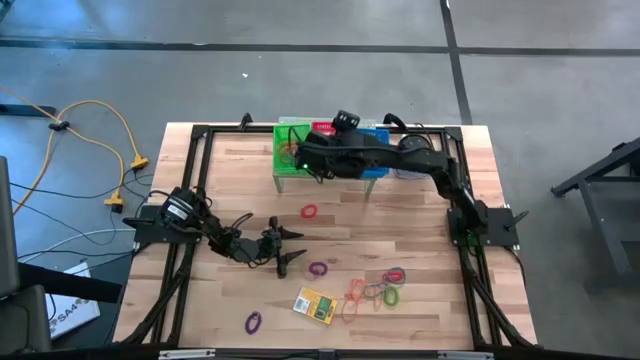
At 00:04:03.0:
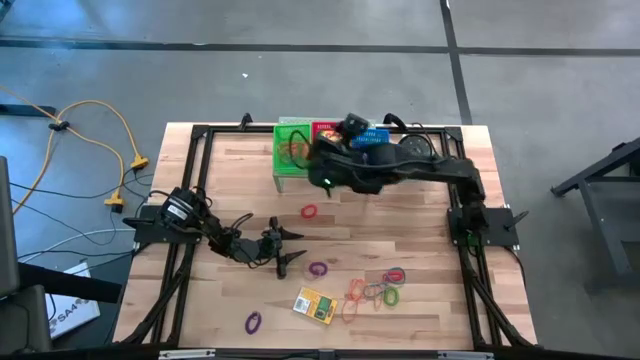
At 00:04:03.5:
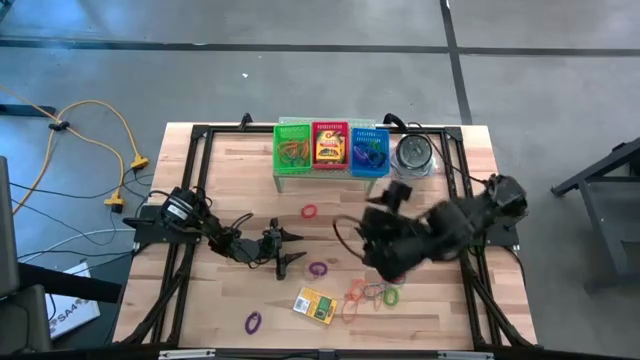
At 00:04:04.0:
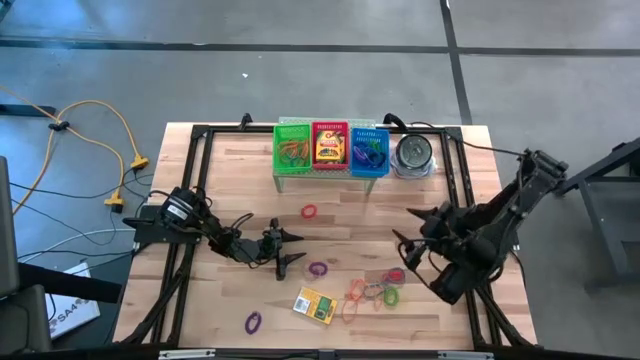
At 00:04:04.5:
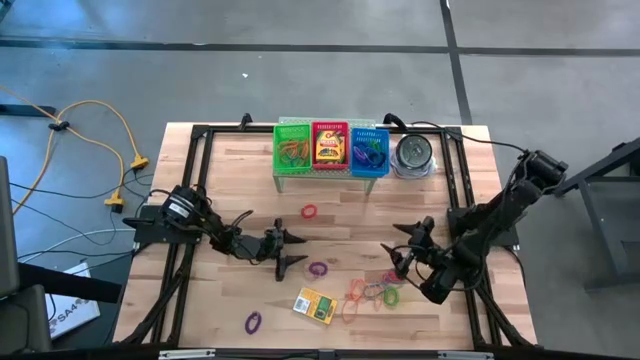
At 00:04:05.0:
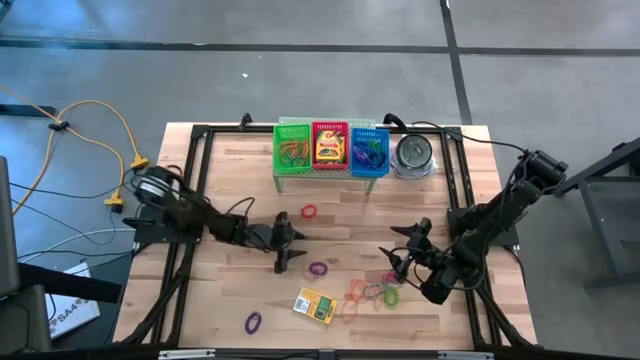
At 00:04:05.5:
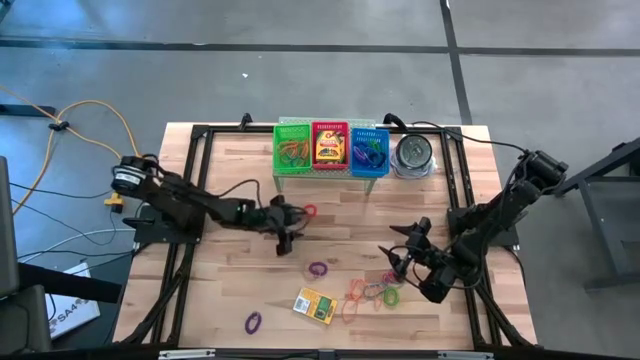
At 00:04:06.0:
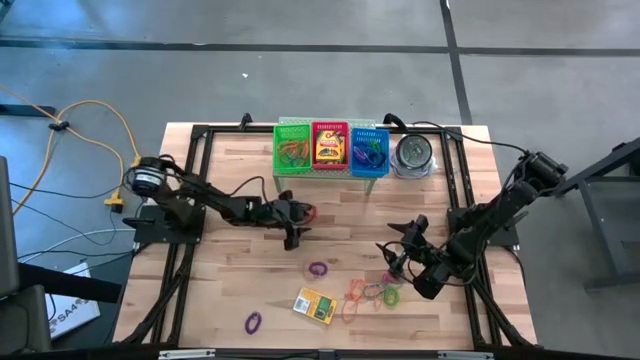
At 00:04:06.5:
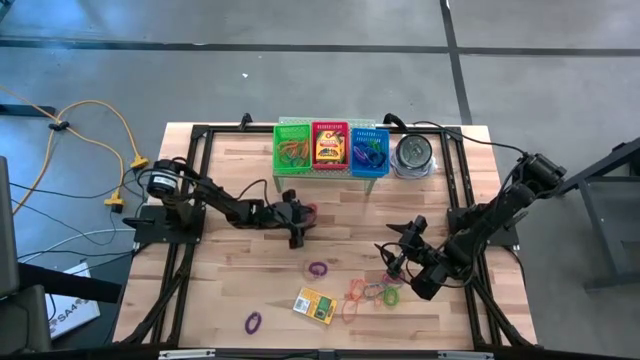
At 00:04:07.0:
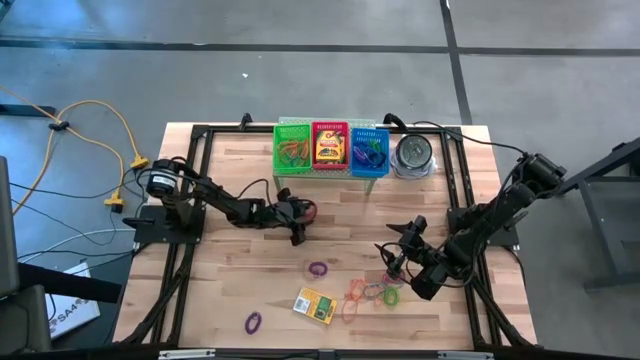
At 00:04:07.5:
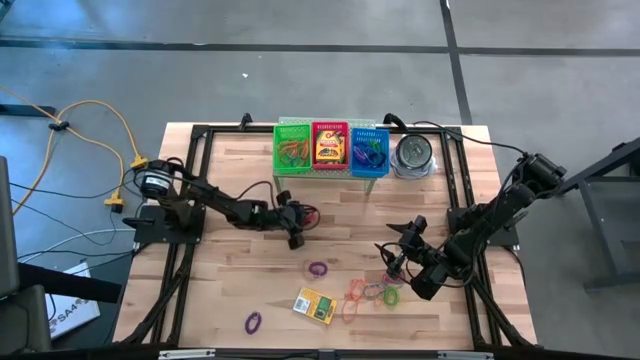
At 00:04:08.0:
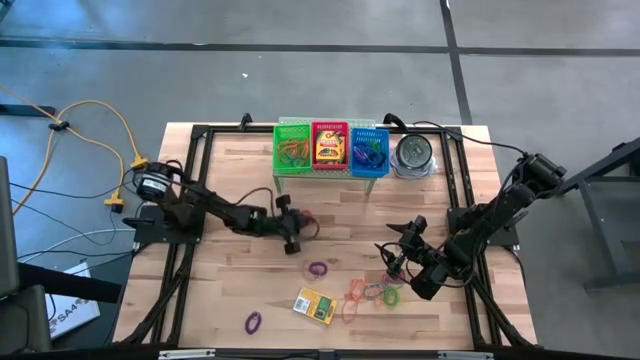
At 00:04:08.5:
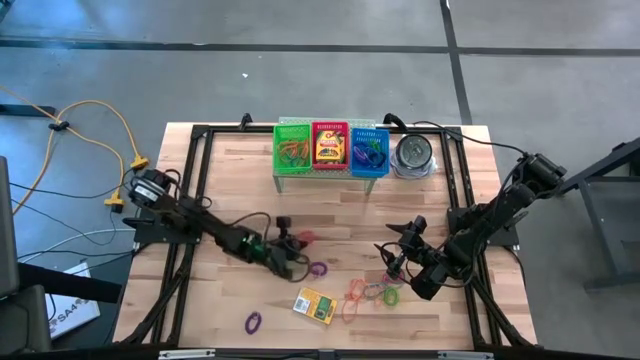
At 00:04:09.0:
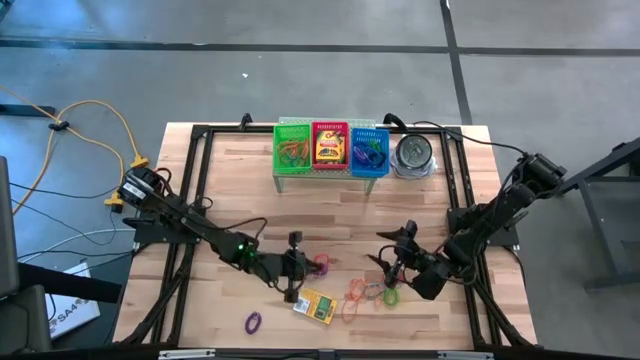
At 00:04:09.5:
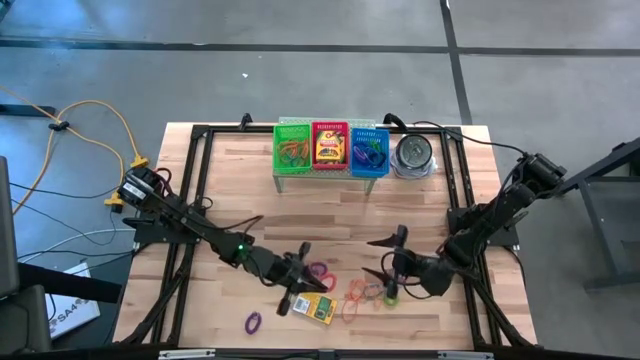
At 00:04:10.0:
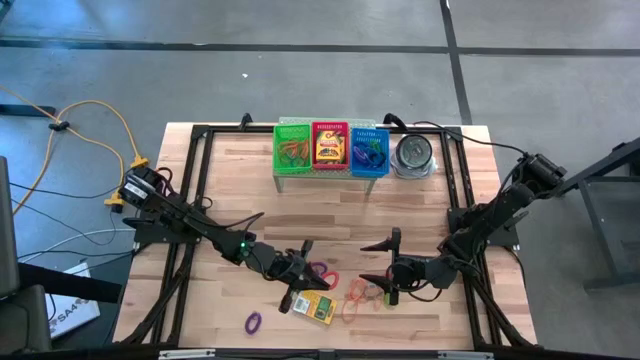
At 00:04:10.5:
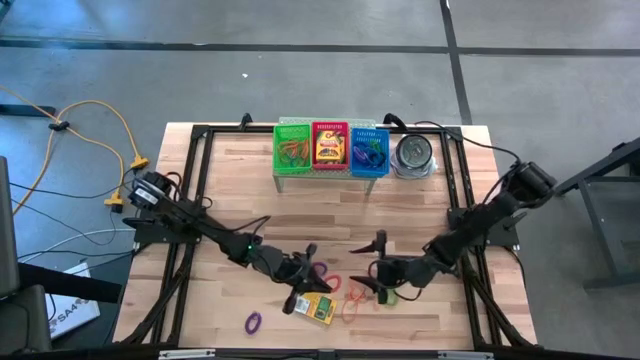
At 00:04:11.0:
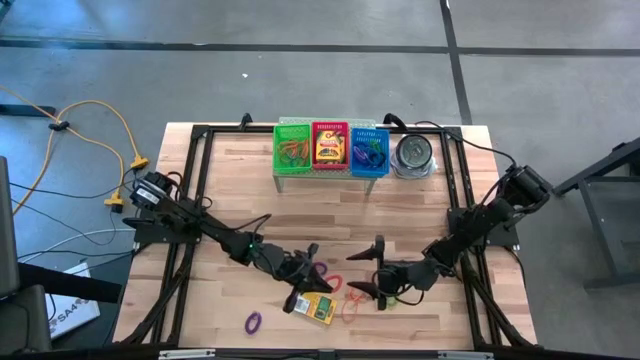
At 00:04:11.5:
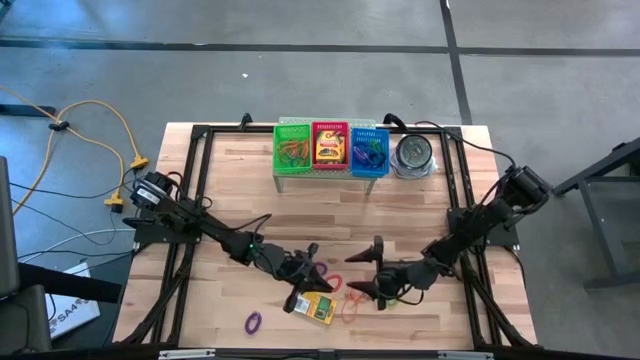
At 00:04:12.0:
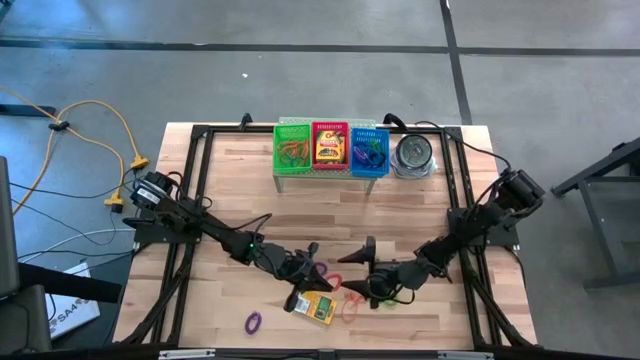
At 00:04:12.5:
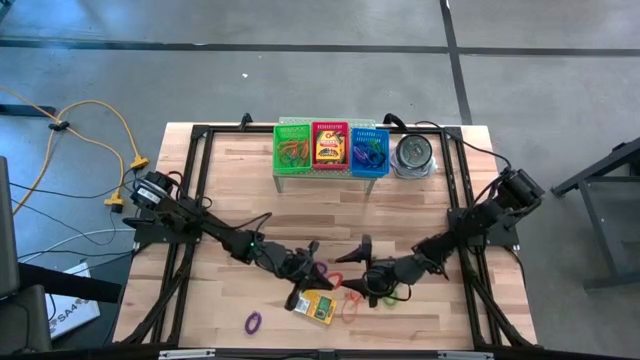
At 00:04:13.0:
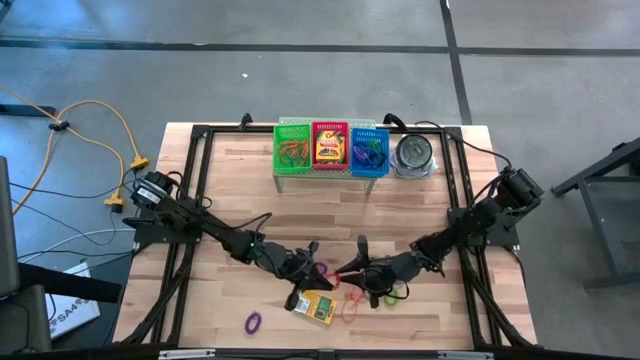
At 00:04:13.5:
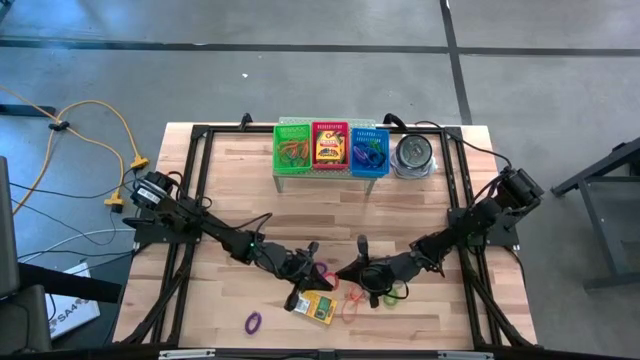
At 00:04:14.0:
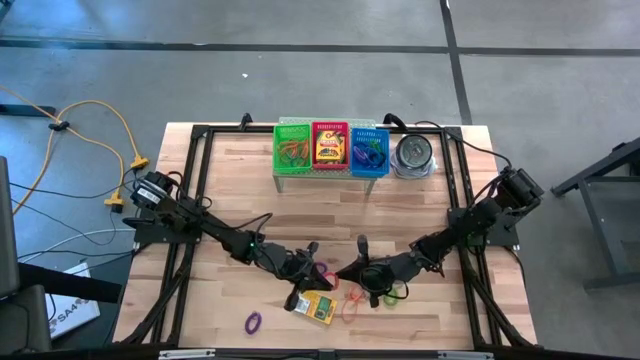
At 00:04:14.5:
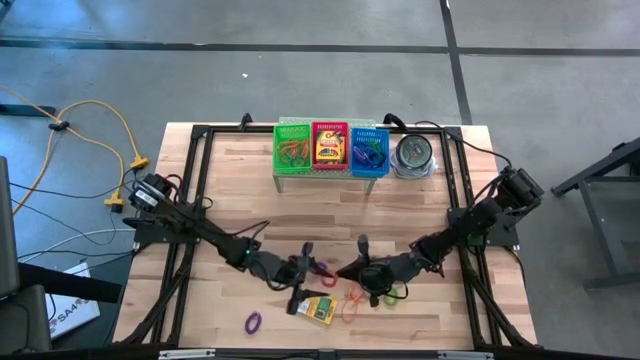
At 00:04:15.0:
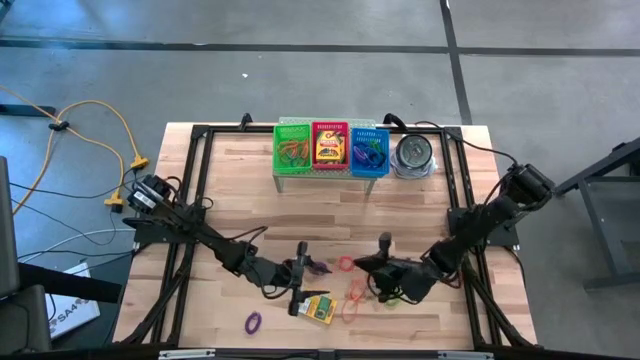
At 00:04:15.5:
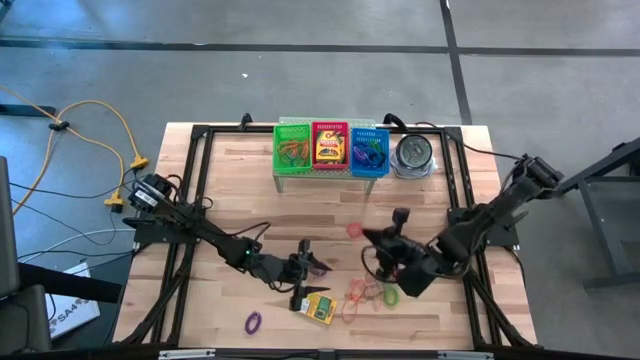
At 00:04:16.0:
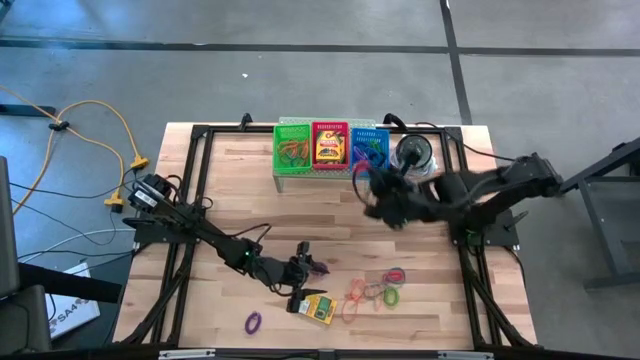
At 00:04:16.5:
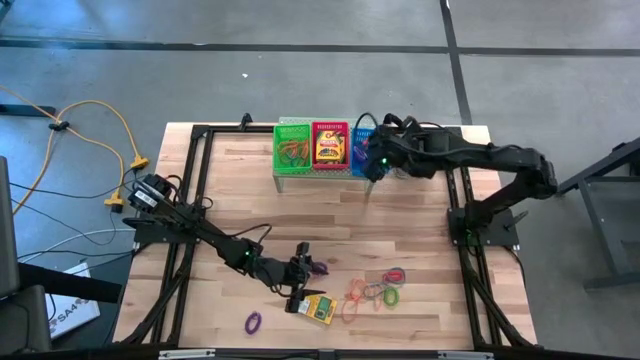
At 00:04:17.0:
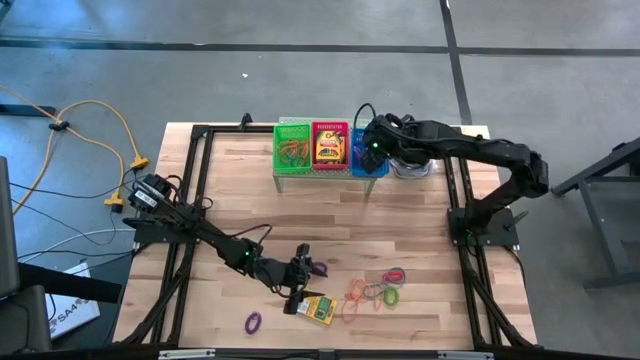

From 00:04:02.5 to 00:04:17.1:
Task: Pick & Place Office Desk Supplies
Put the red spring keychain into the blue bin on the shelf
